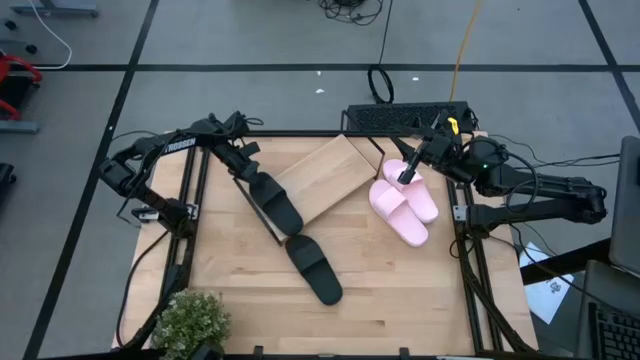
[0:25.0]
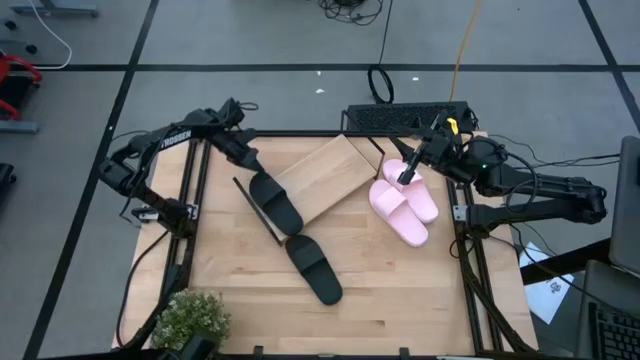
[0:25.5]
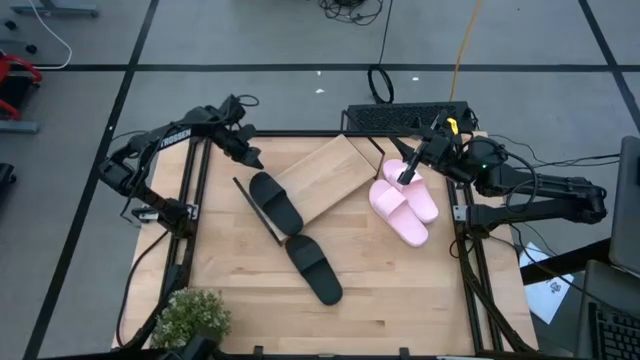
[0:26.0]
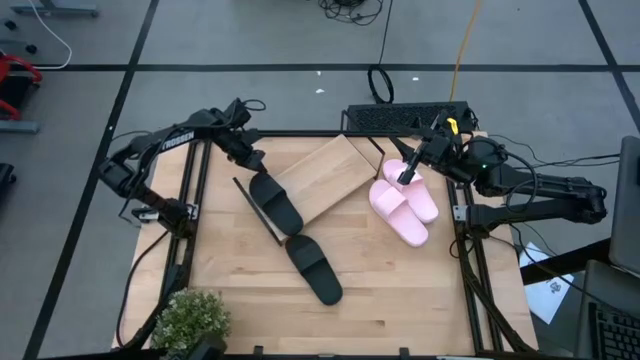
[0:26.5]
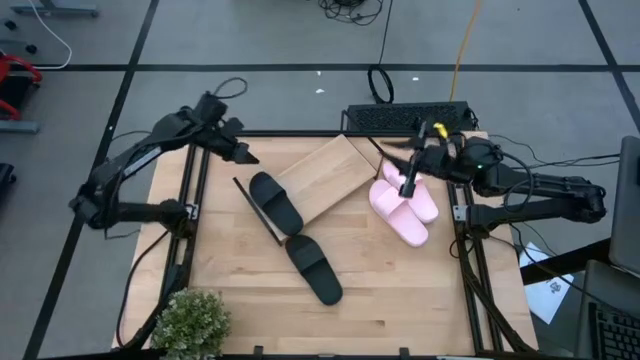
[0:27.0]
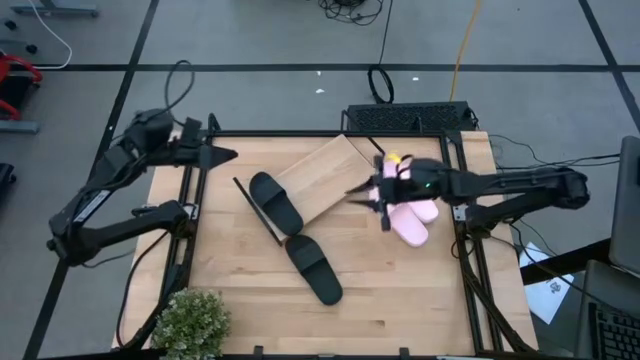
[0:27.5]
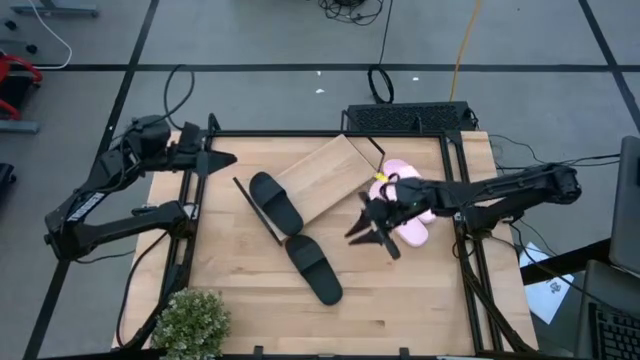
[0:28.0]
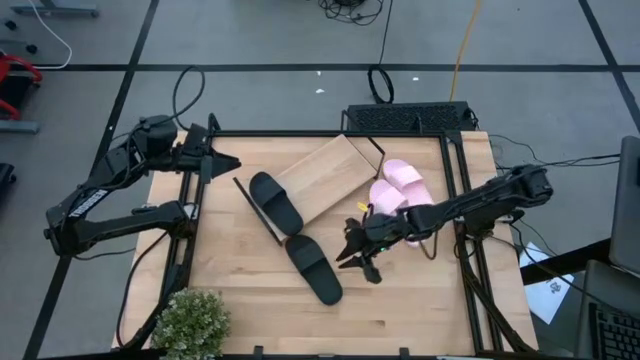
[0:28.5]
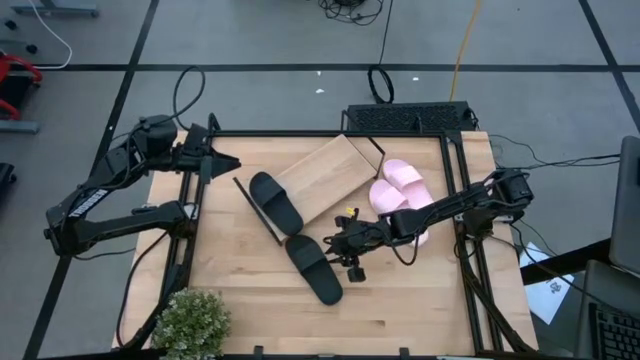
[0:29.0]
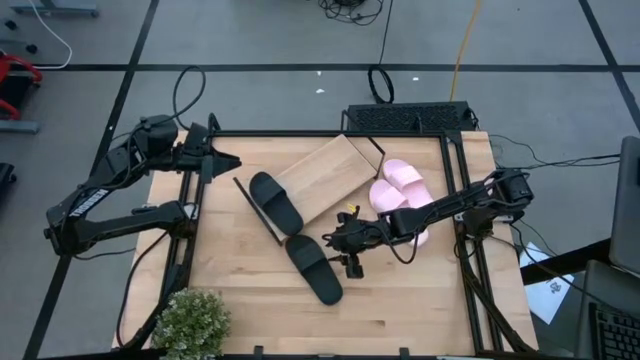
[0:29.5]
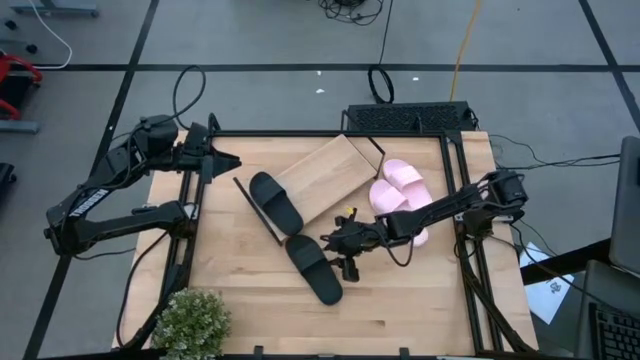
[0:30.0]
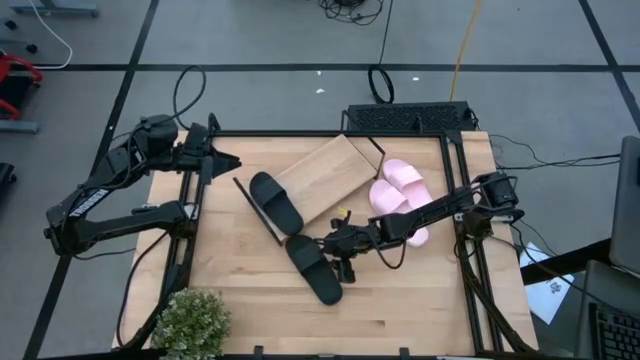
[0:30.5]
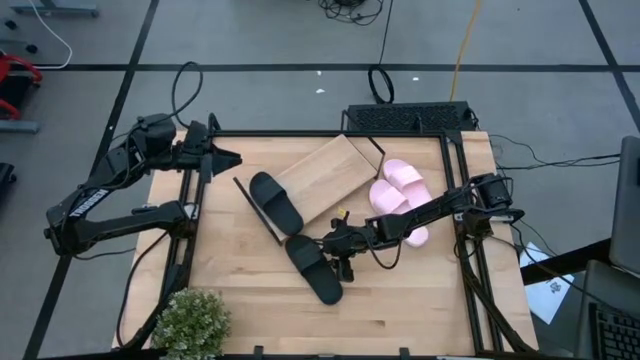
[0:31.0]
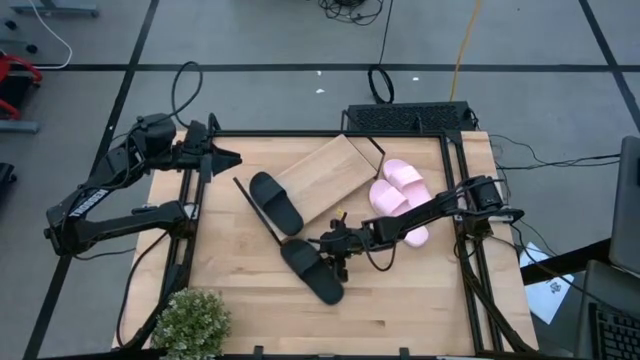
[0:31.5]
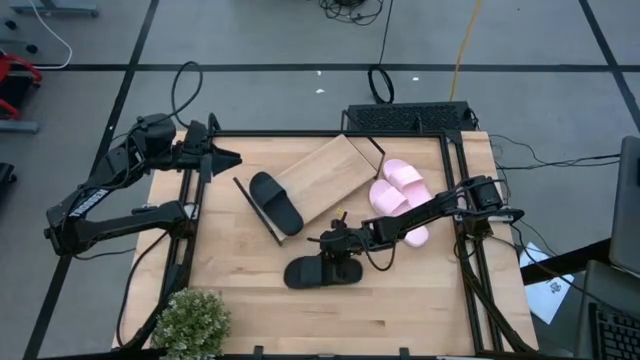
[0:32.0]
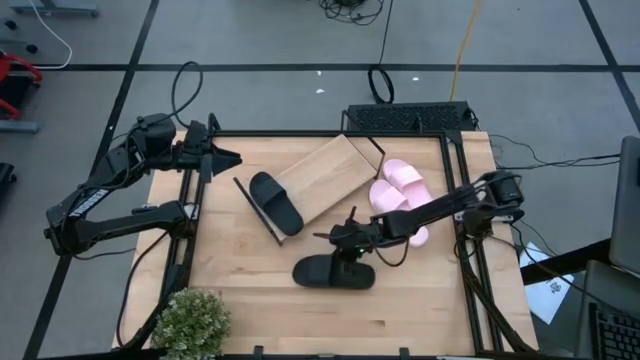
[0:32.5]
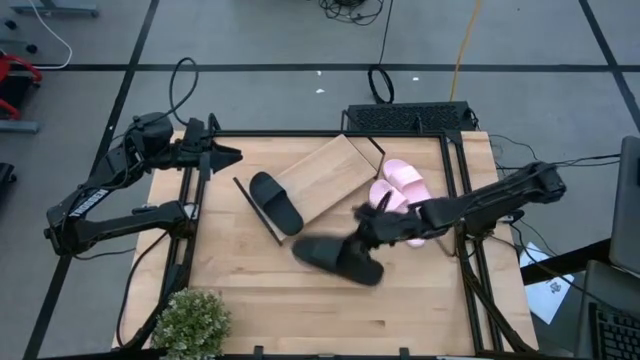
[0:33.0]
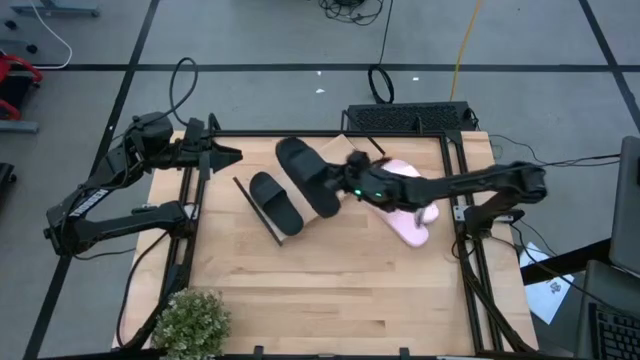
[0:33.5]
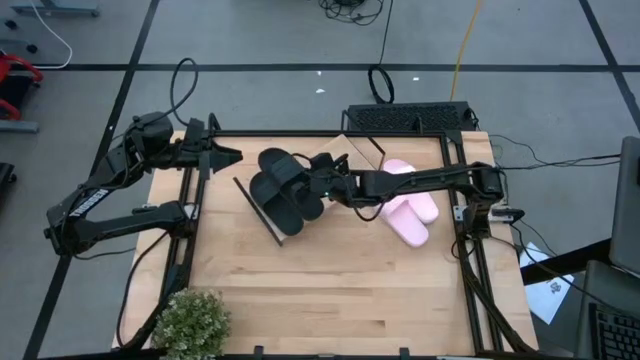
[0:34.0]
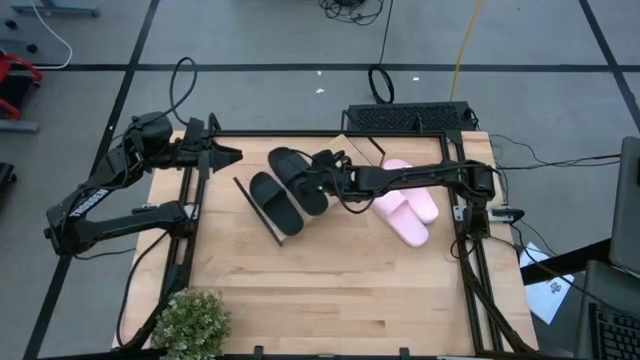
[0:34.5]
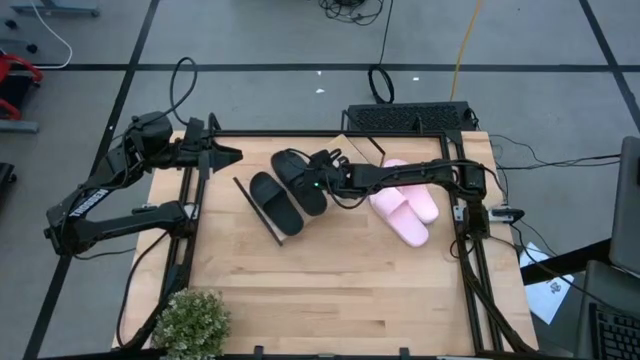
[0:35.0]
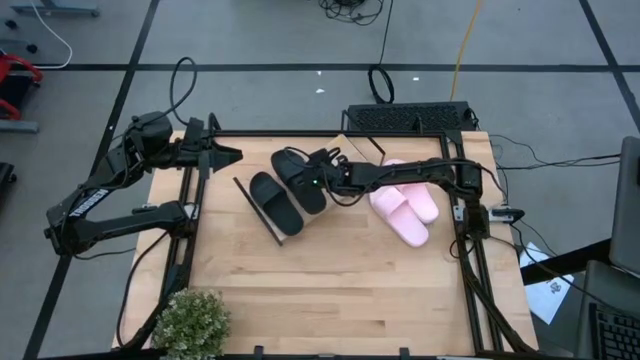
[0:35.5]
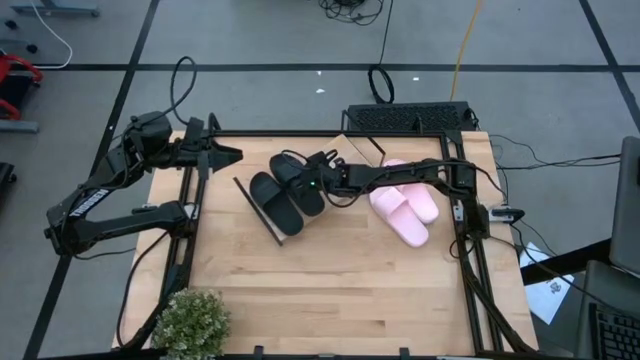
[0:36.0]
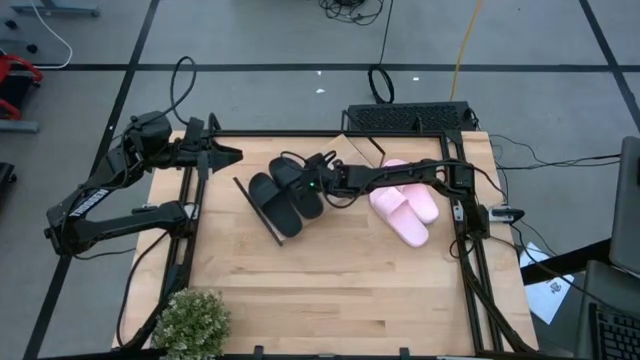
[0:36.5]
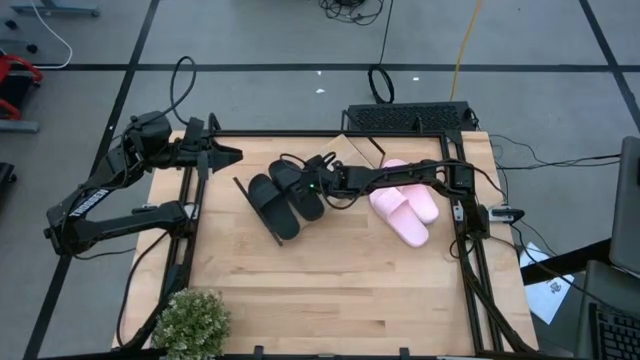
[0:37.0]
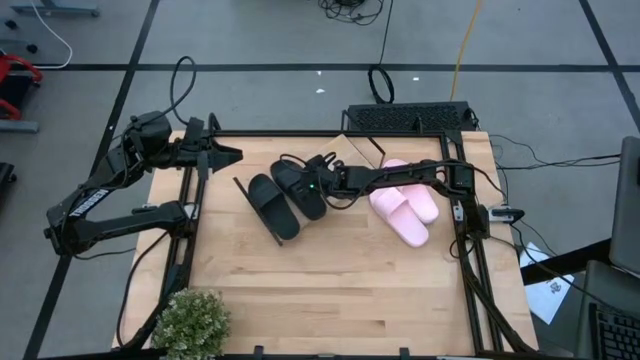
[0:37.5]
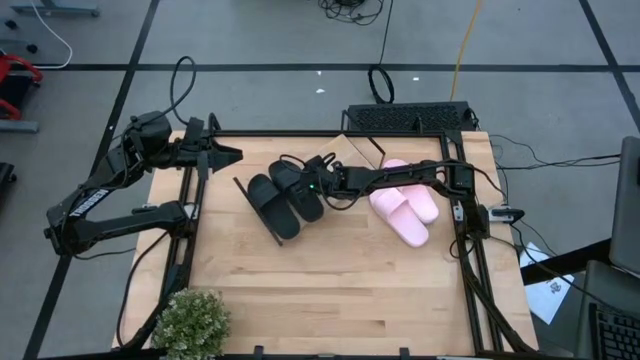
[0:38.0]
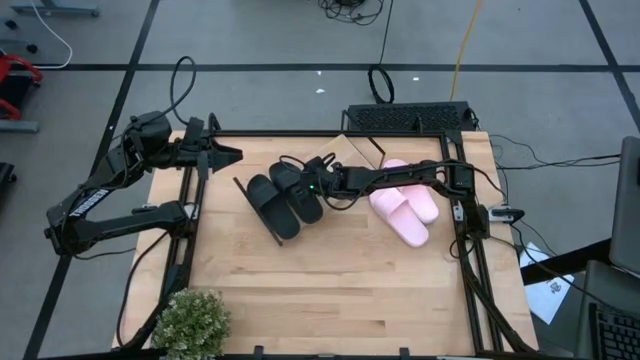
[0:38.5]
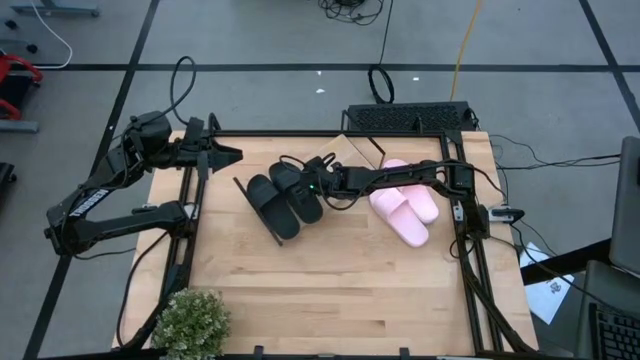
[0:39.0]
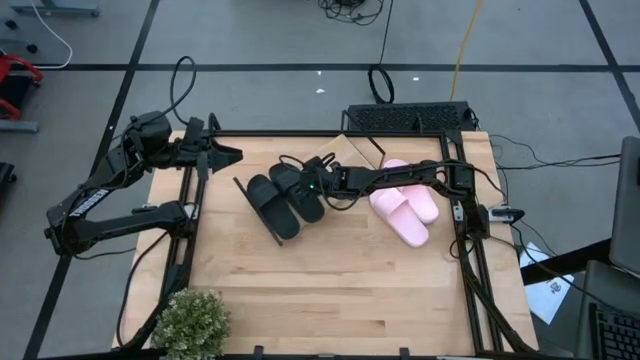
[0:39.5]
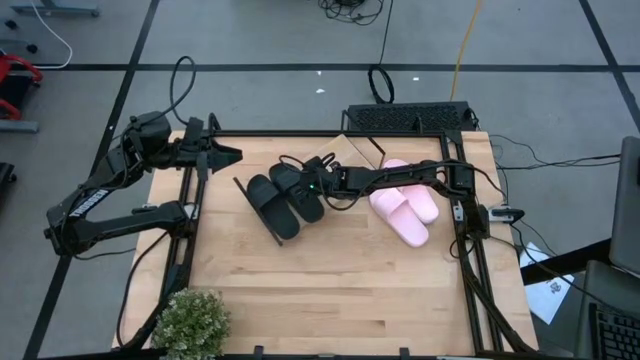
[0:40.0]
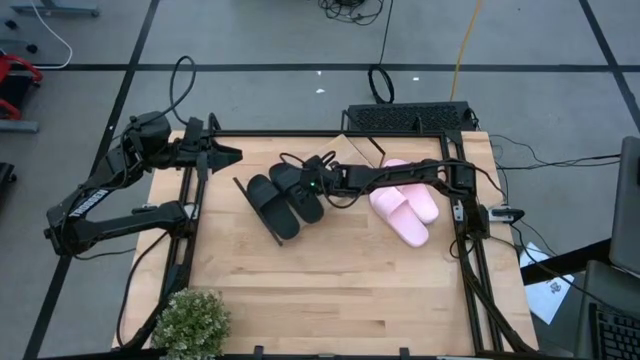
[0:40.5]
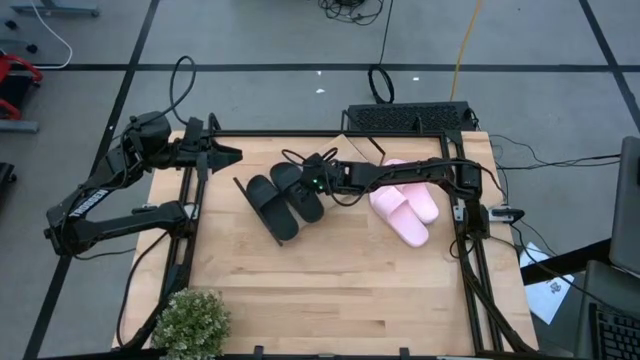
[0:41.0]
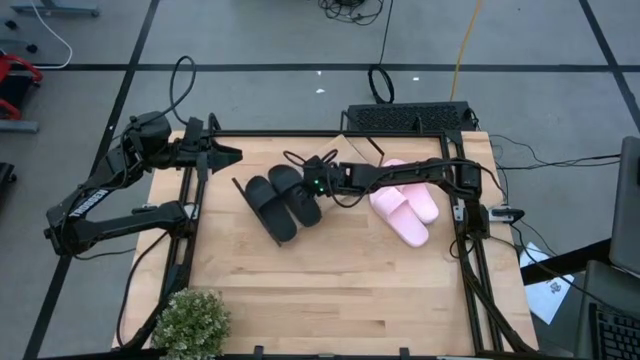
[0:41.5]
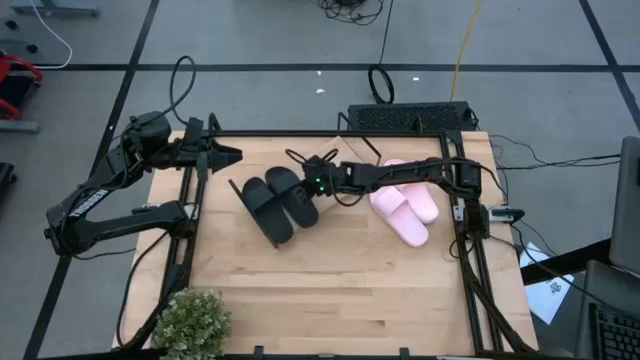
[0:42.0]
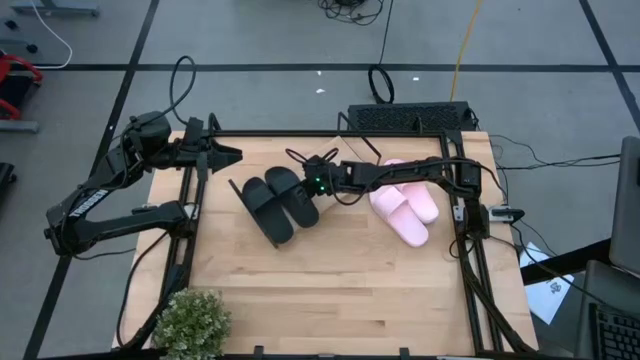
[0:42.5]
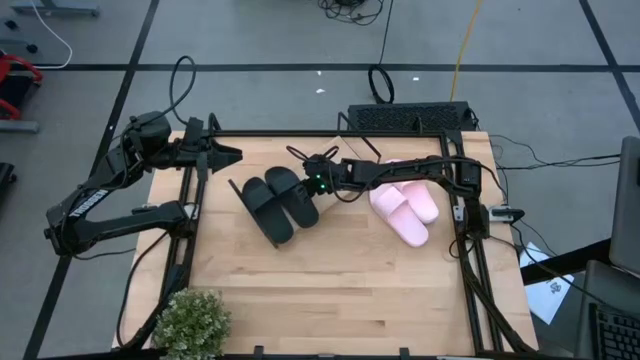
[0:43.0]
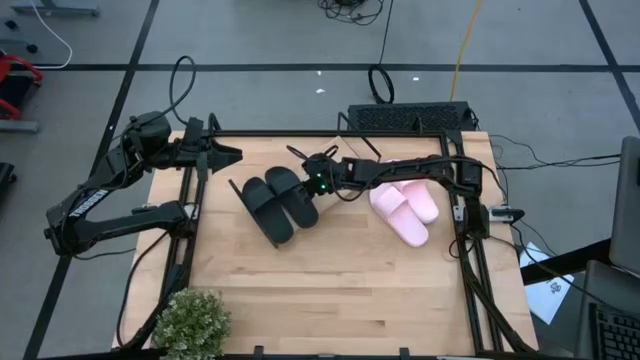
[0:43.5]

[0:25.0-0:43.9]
Task: Pick and place slides into the shelf
Put the black slide on the shelf
